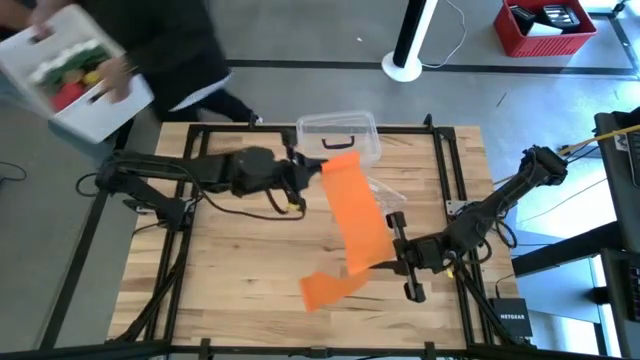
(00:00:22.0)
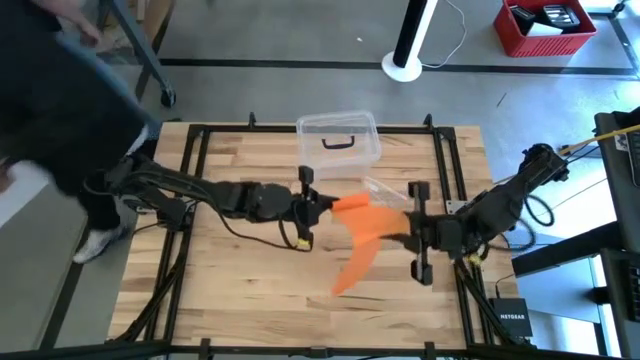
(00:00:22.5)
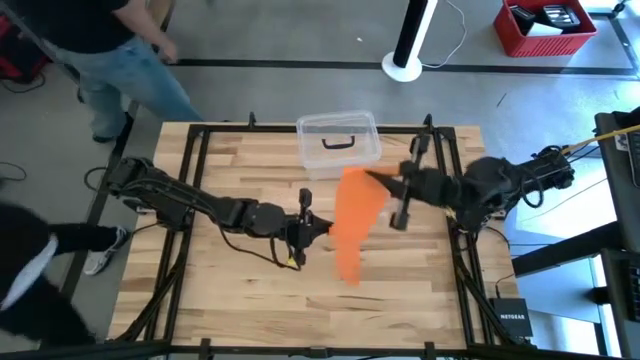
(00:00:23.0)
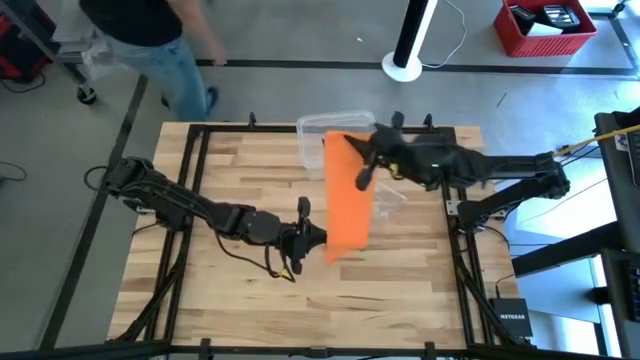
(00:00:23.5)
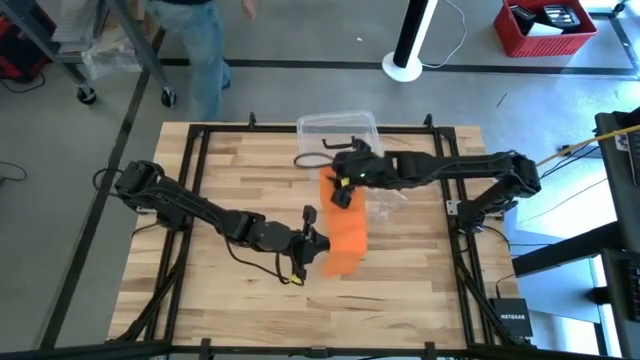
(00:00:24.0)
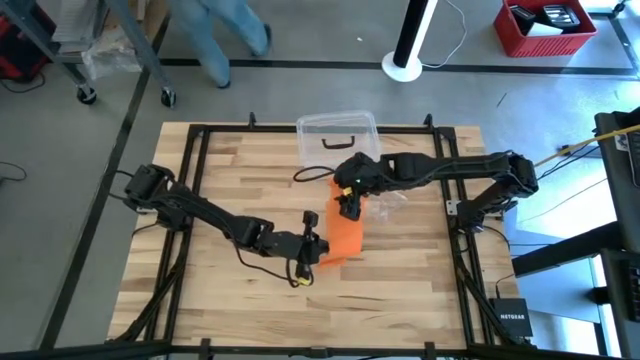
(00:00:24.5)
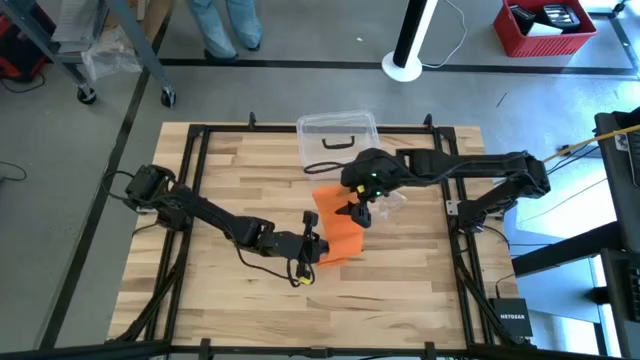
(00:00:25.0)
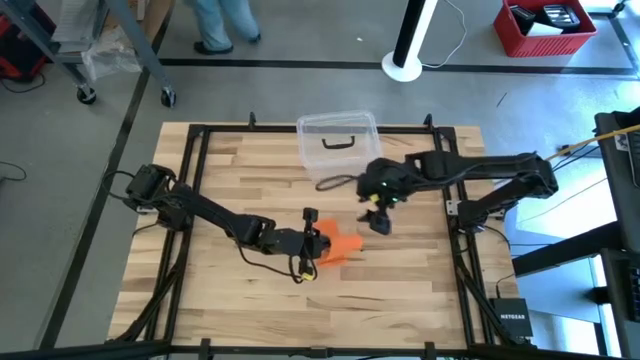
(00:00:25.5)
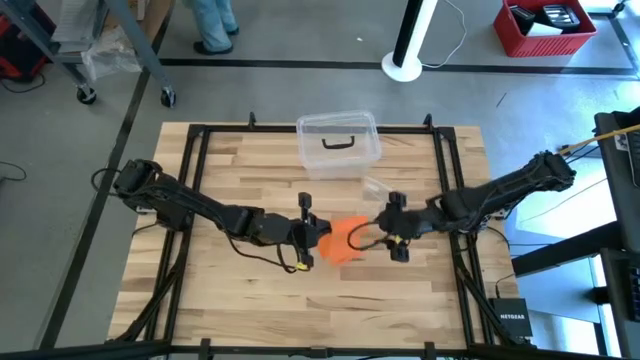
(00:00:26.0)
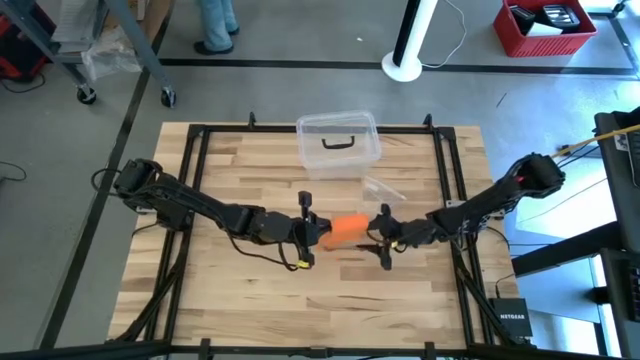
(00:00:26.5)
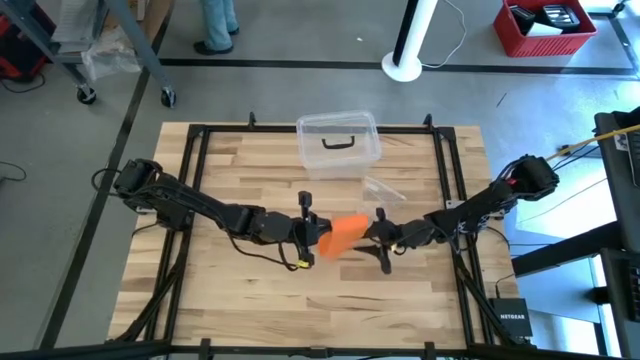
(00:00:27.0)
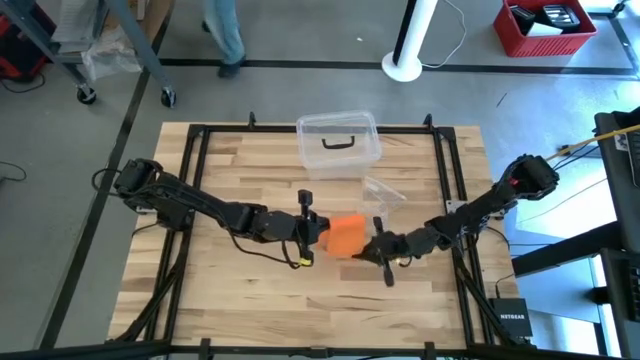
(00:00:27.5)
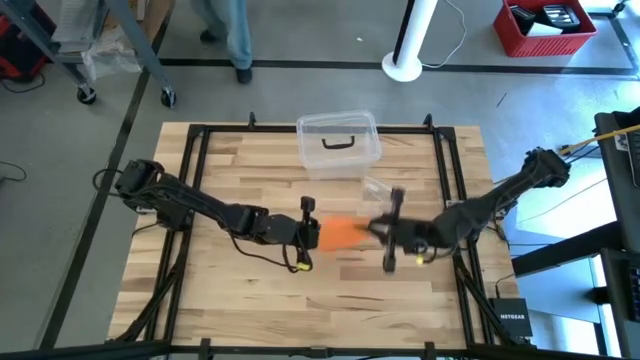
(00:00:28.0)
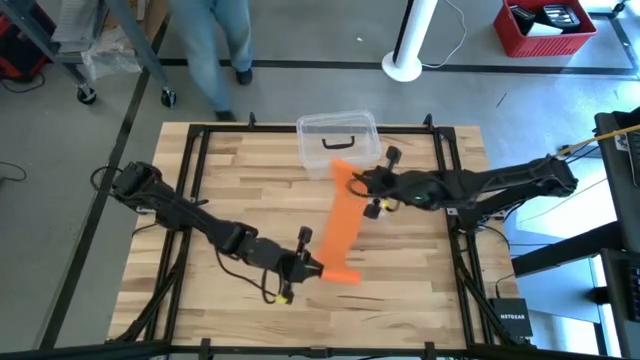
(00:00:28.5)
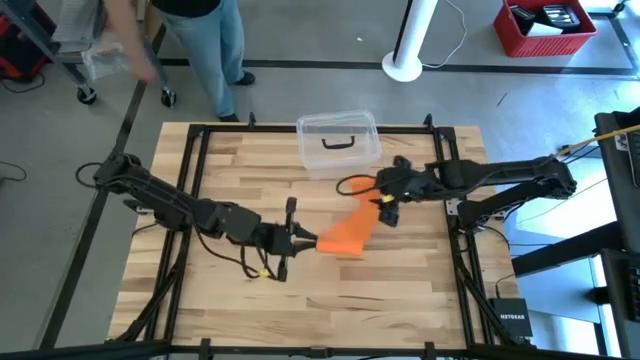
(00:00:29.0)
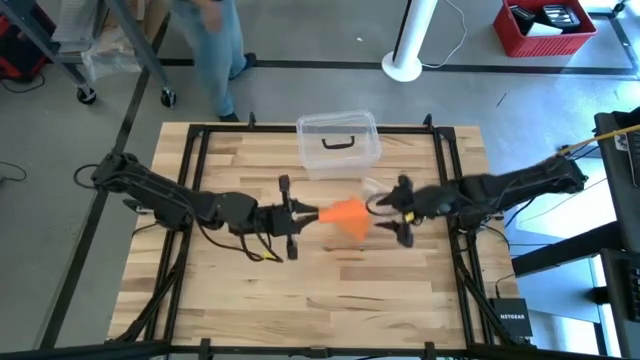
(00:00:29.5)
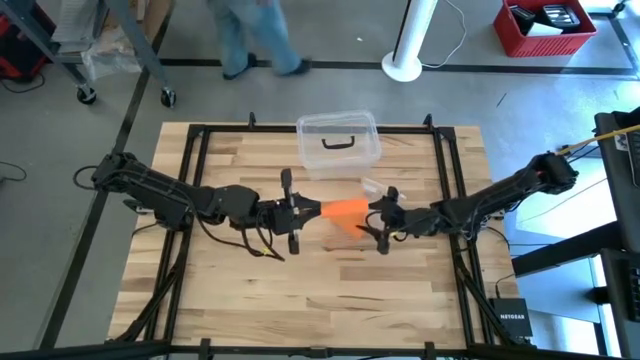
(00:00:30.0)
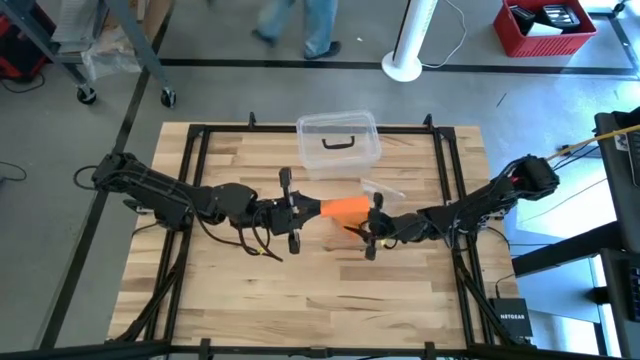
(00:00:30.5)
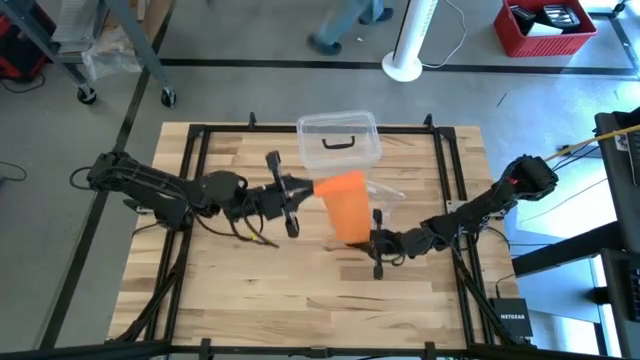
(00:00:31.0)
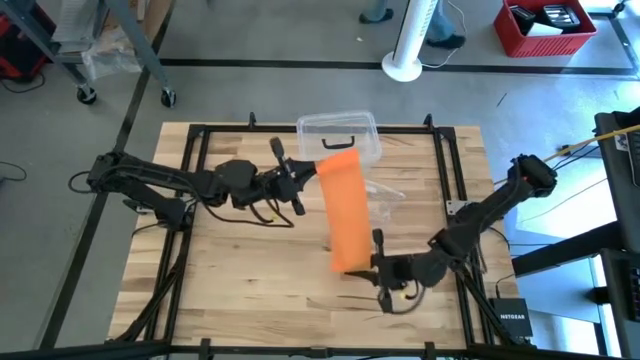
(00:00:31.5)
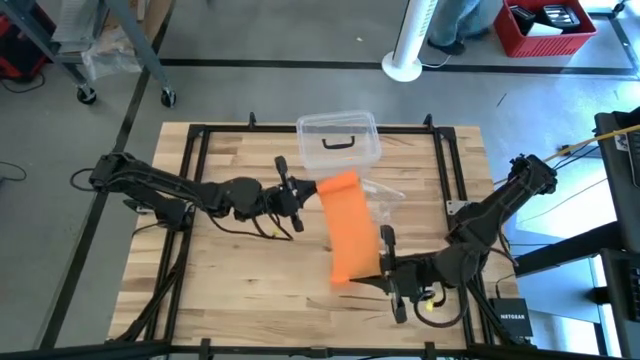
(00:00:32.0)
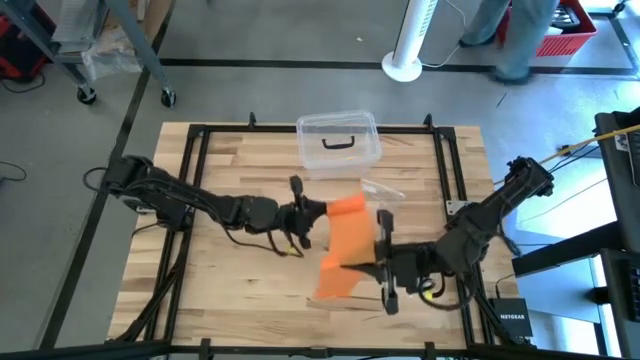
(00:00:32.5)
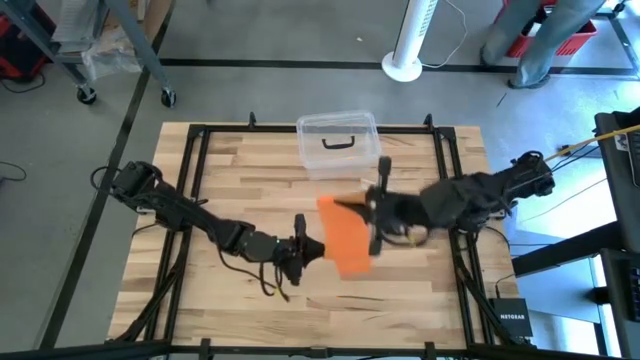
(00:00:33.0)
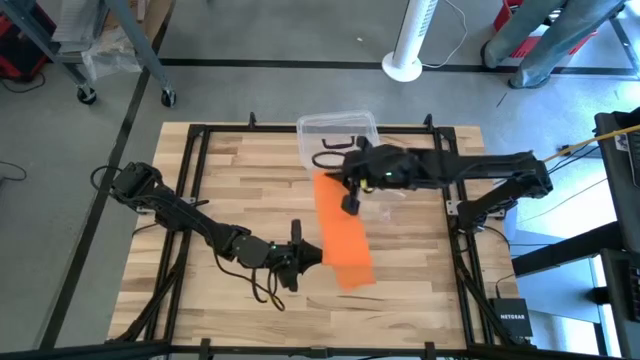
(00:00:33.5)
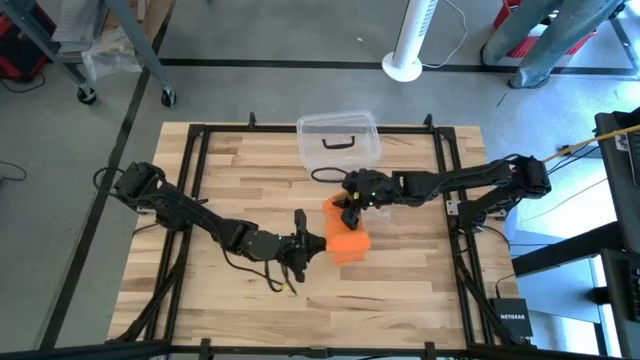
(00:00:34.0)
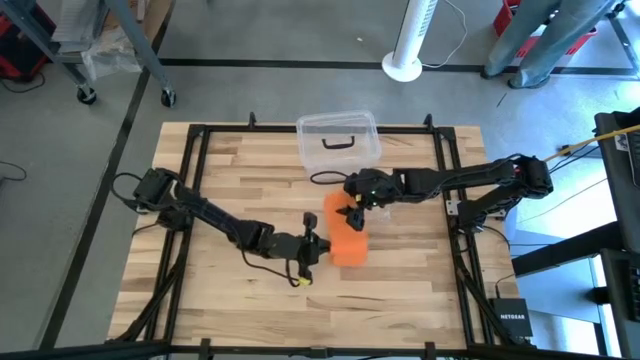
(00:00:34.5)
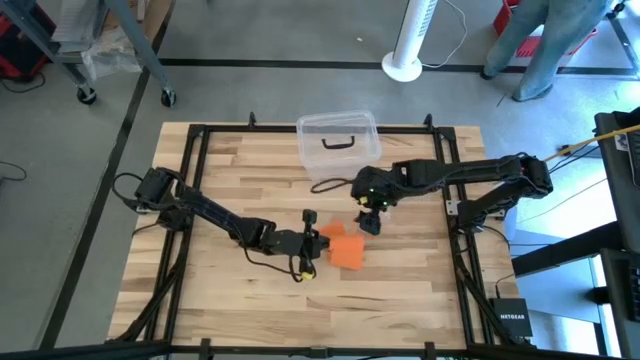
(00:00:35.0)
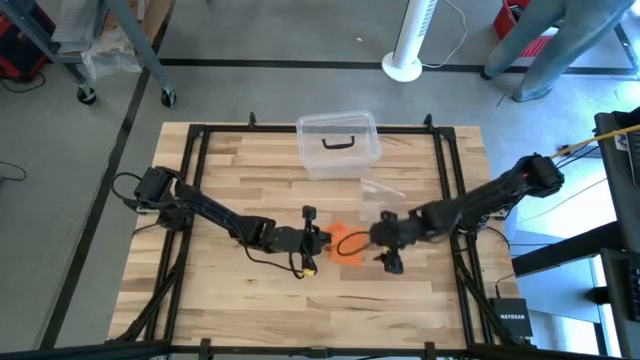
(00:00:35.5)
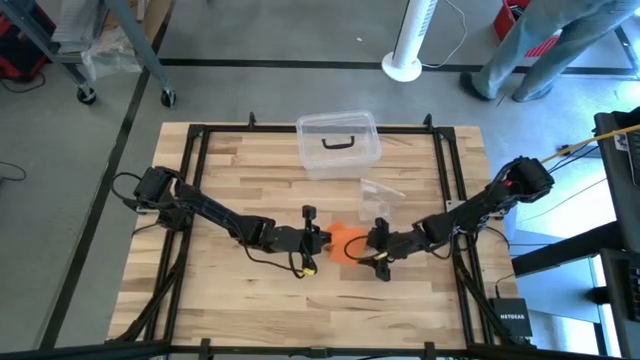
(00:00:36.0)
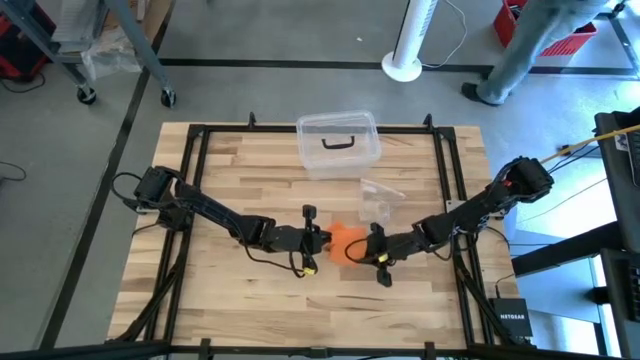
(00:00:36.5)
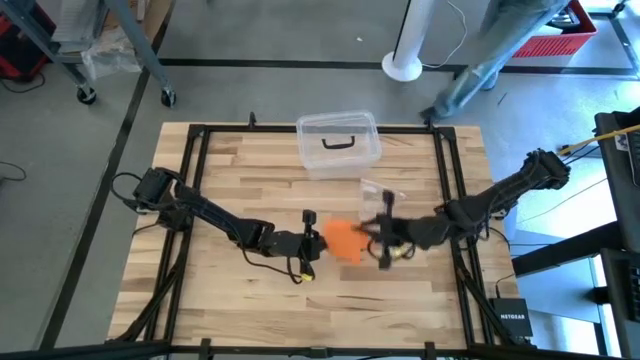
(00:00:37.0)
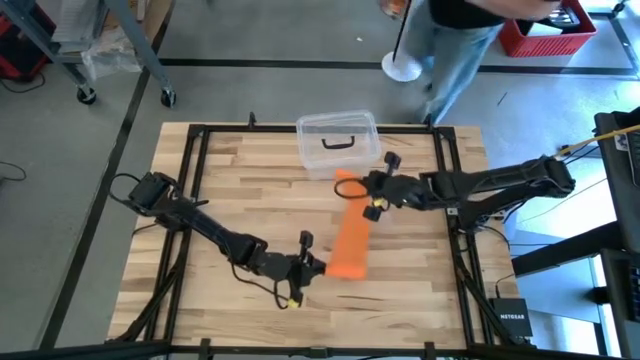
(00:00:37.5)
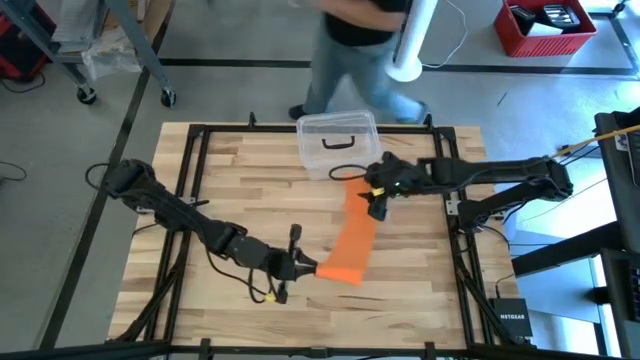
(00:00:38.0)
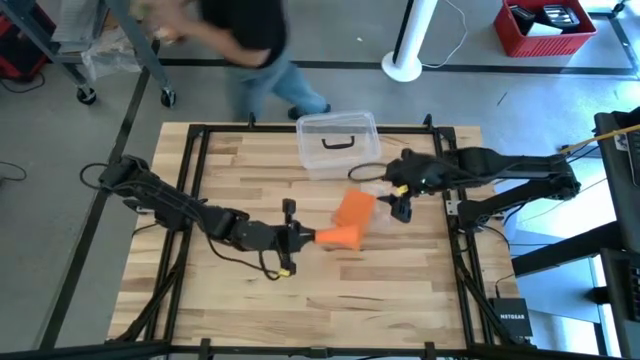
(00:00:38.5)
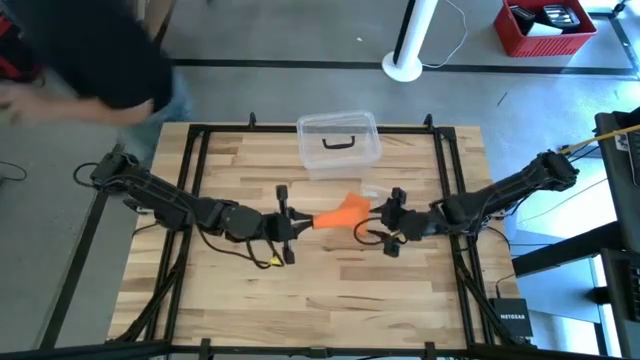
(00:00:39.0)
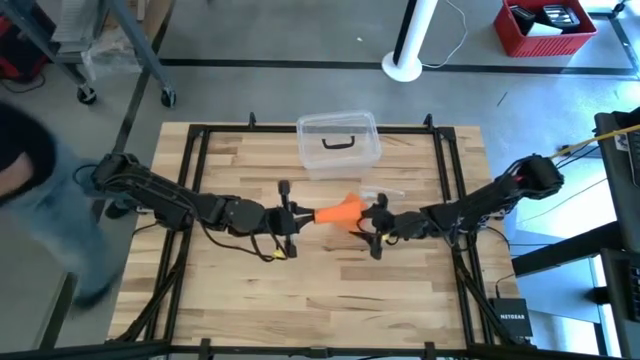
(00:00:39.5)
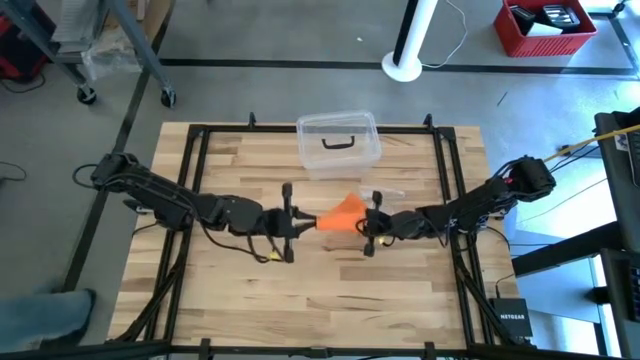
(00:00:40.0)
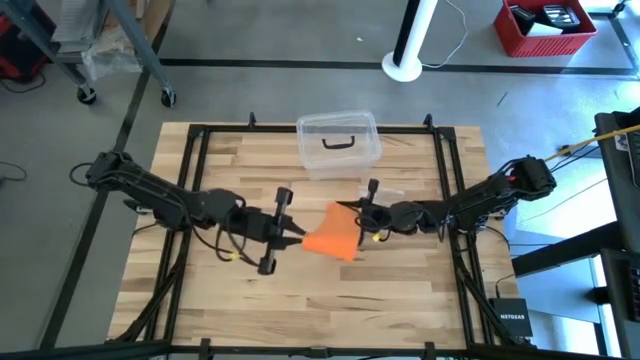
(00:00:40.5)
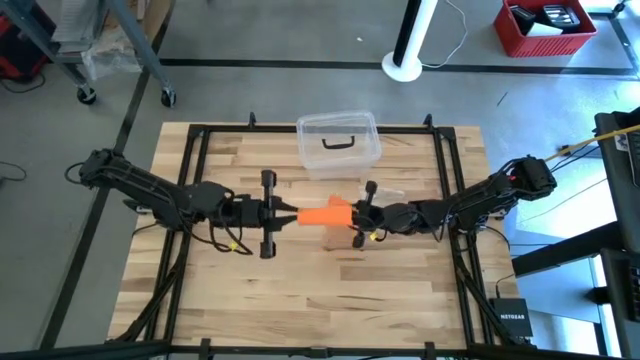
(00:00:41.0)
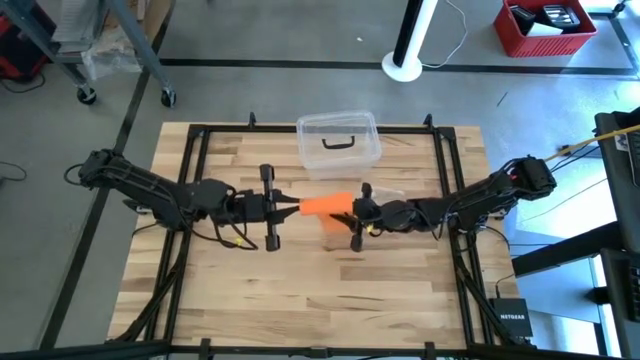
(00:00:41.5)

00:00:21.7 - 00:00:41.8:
Task: Roll bandage
Roll the orange bandage
